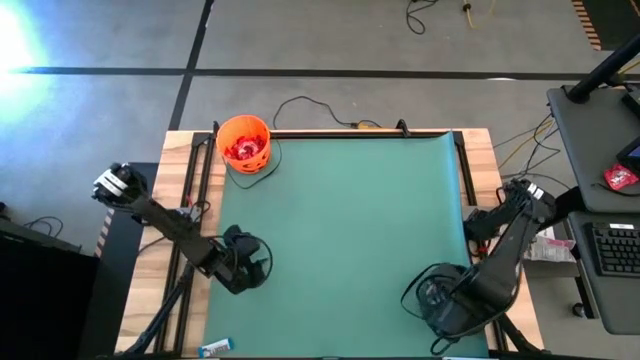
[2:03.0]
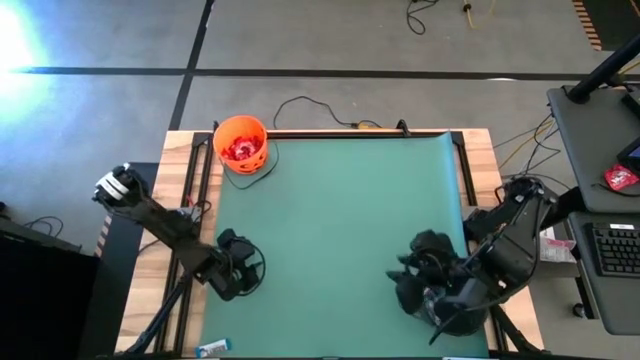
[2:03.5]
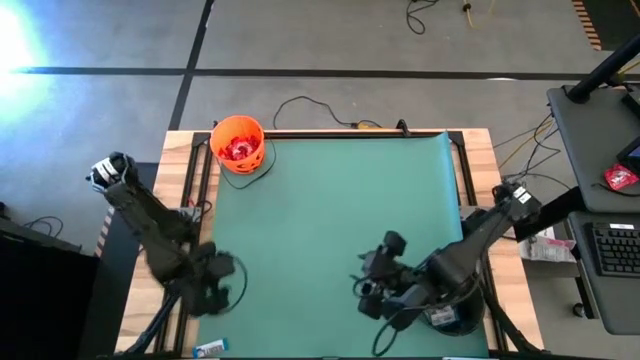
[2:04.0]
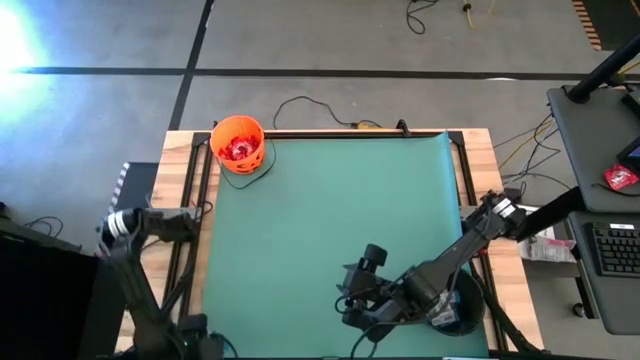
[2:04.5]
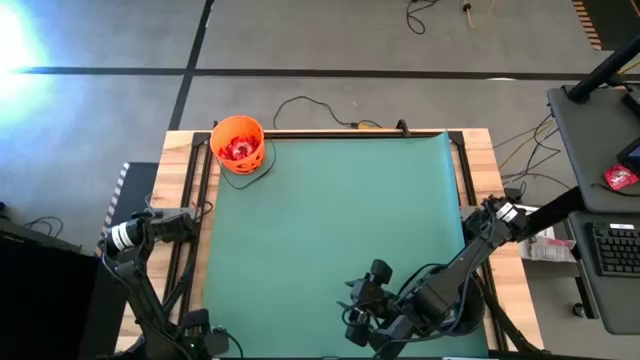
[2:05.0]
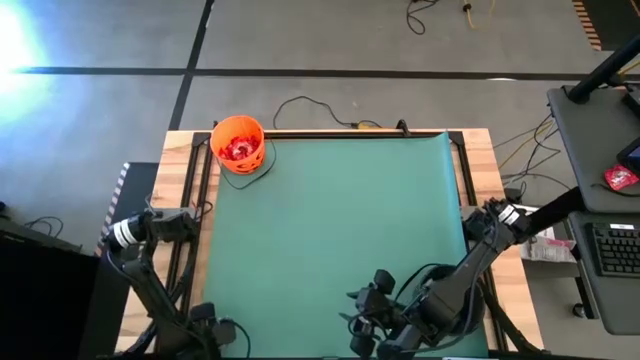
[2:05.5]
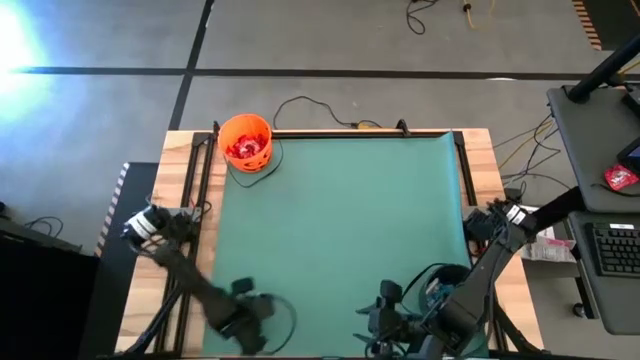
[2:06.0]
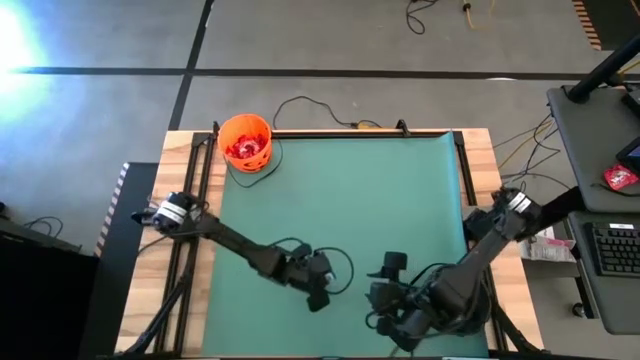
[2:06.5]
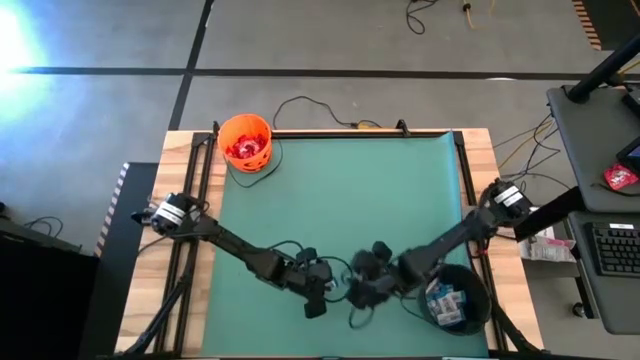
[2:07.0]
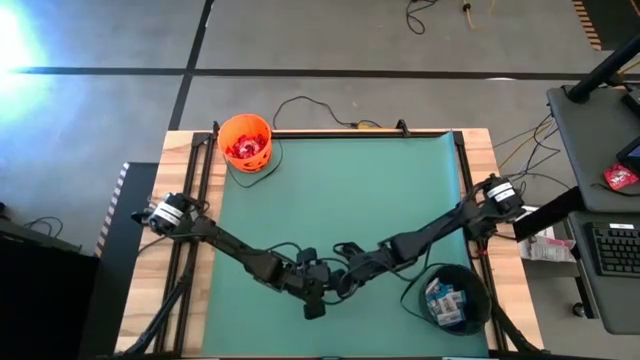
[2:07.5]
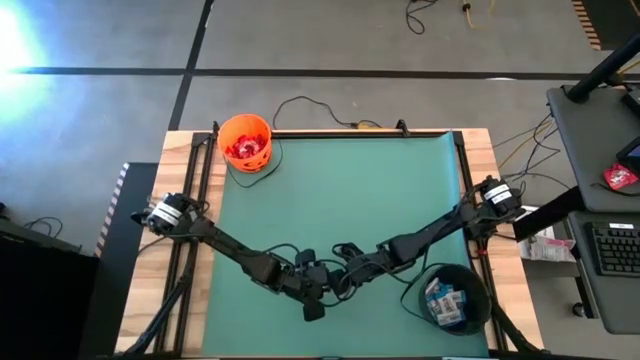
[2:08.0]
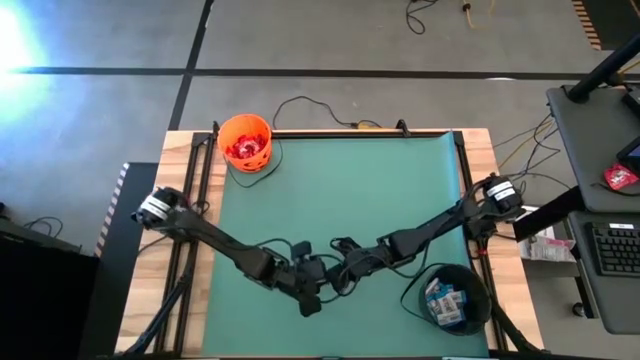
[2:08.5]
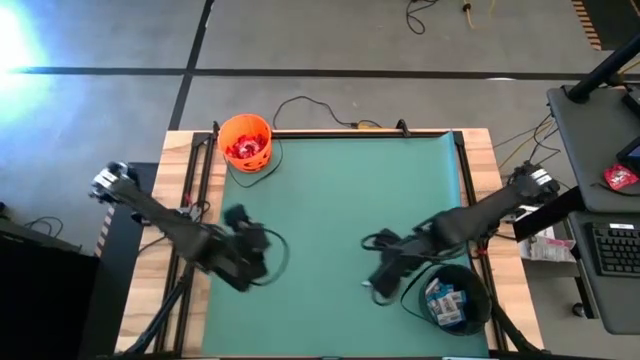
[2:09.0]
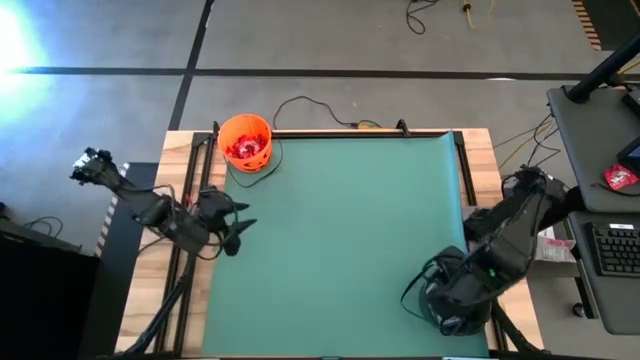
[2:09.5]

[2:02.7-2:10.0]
Task: Sort candy by brand, put in halloween buckets
Put the white chocolate into the black bucket

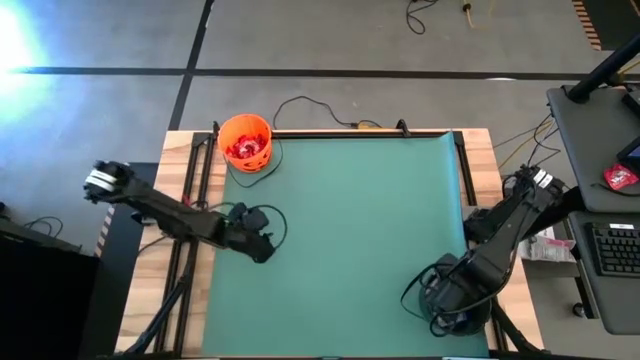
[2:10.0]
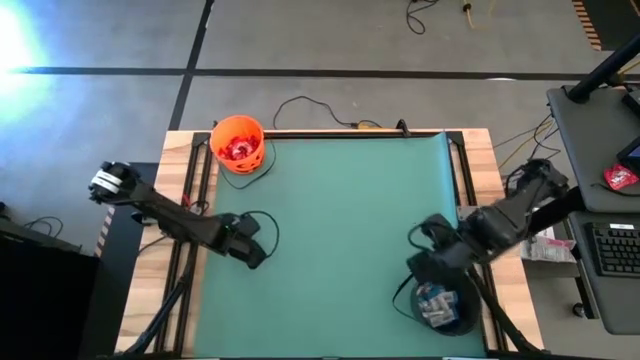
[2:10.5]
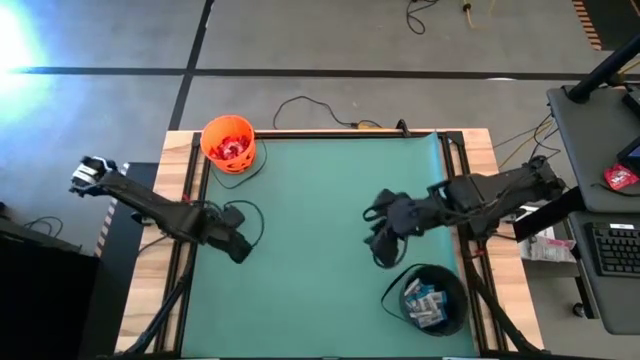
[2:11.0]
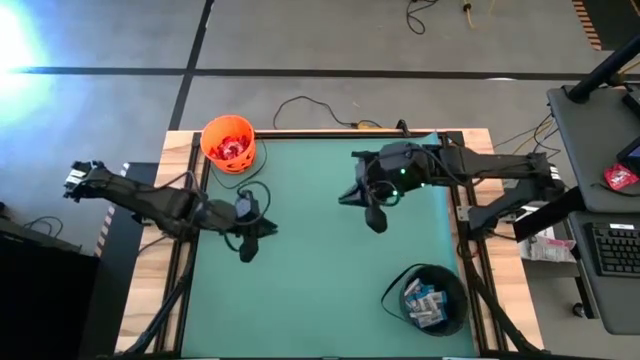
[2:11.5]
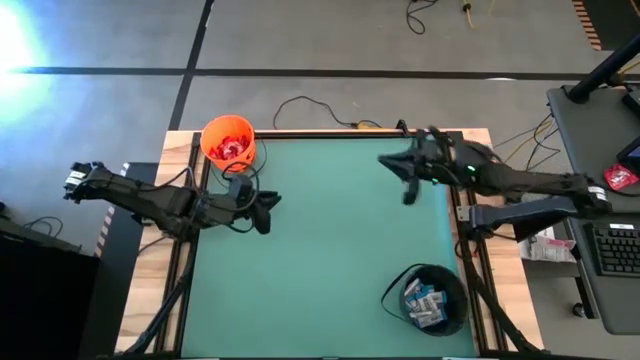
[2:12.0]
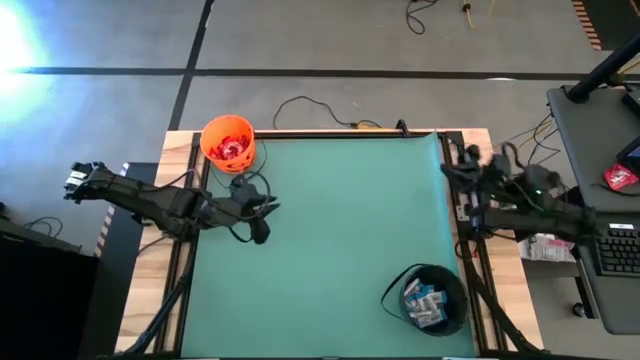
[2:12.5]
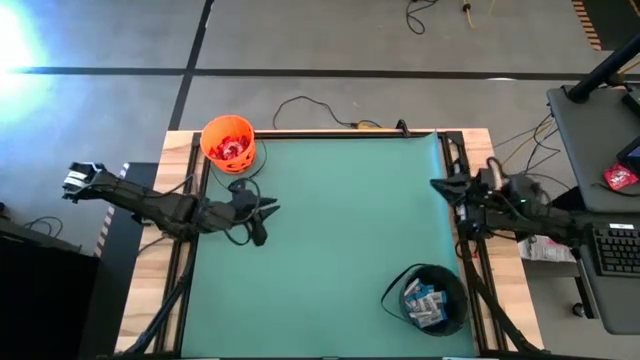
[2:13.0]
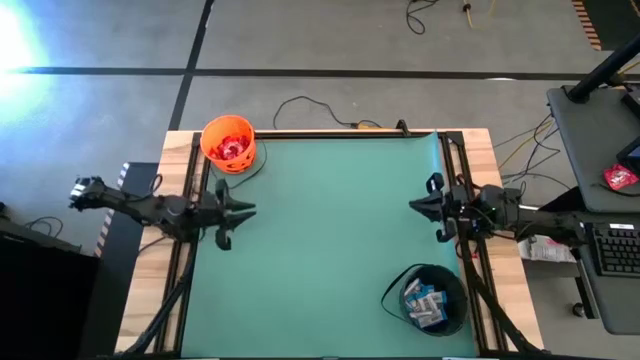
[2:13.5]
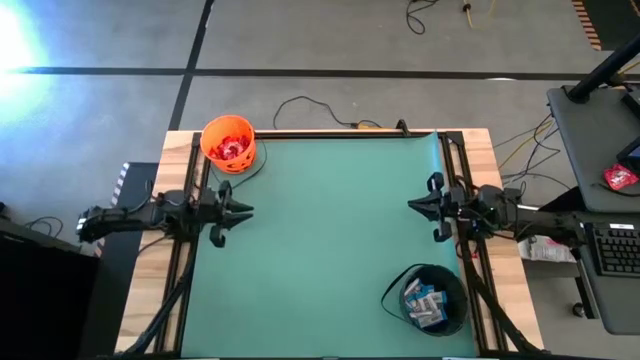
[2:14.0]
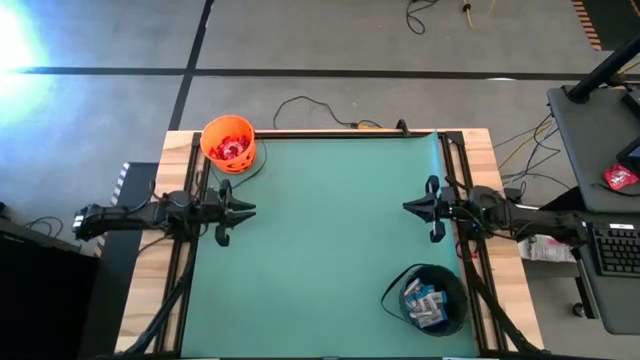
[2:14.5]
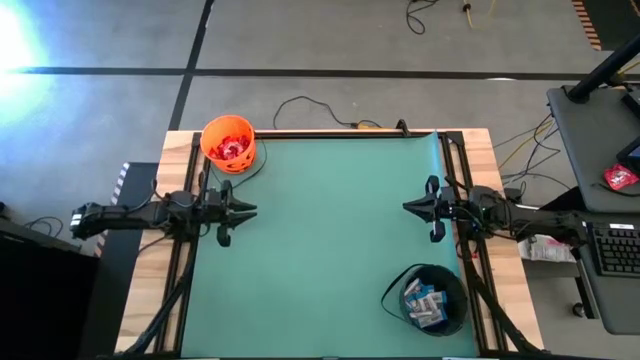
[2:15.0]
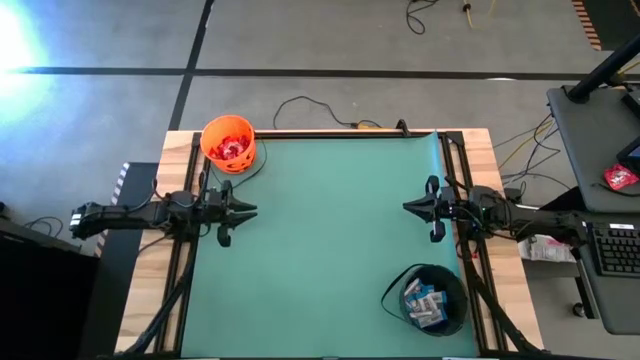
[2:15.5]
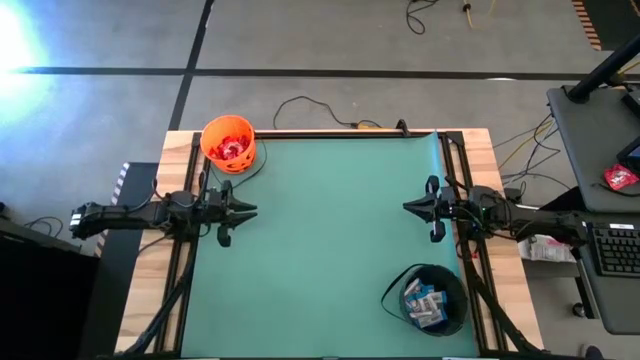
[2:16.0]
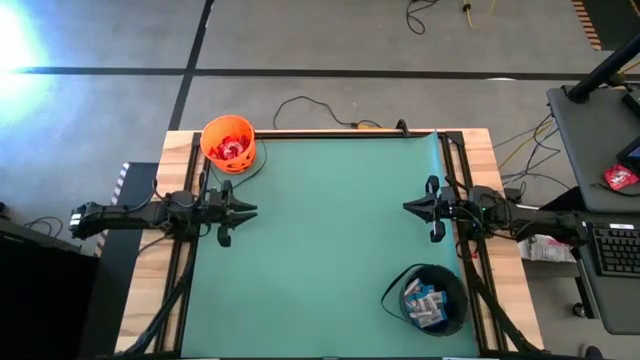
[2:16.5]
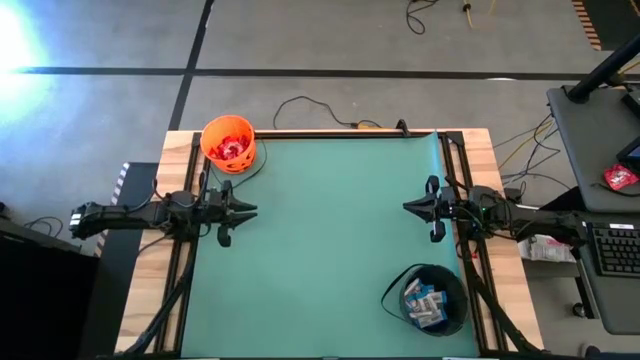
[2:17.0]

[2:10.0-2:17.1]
Return to Home Position

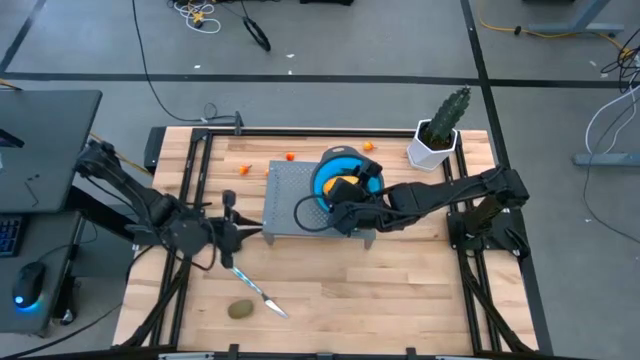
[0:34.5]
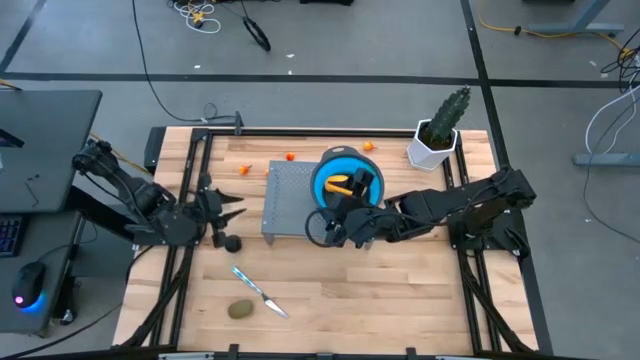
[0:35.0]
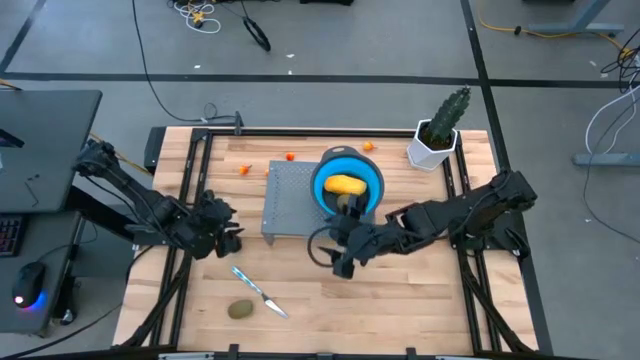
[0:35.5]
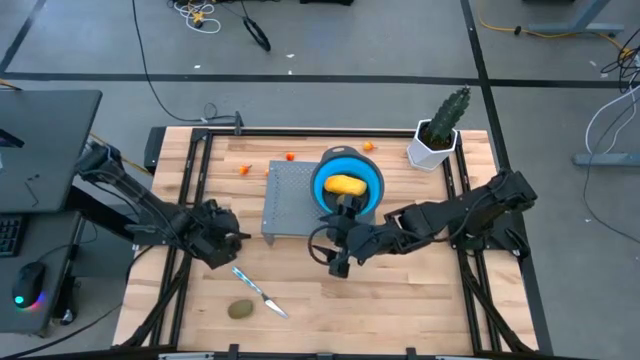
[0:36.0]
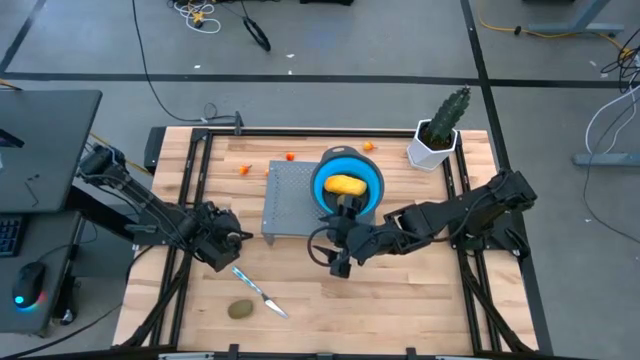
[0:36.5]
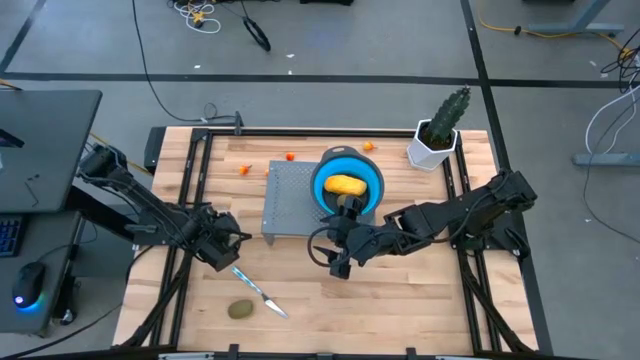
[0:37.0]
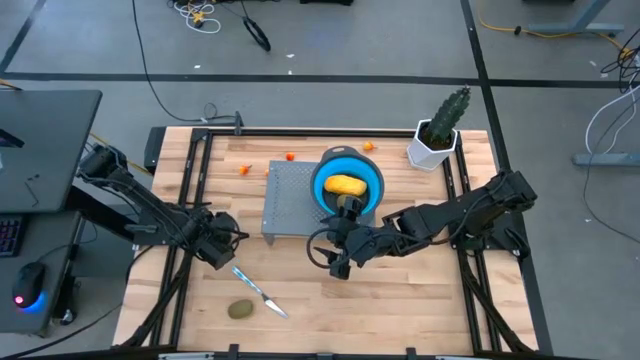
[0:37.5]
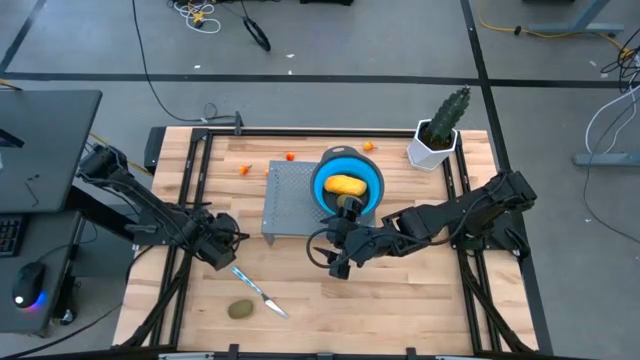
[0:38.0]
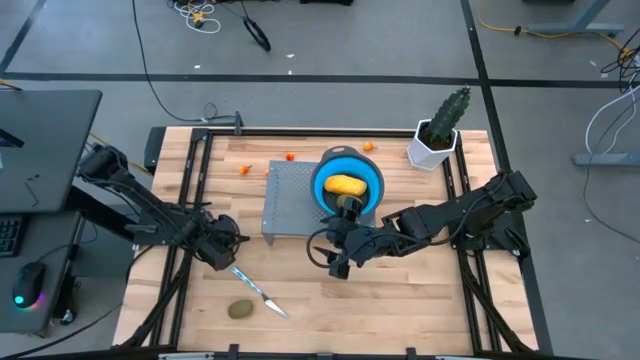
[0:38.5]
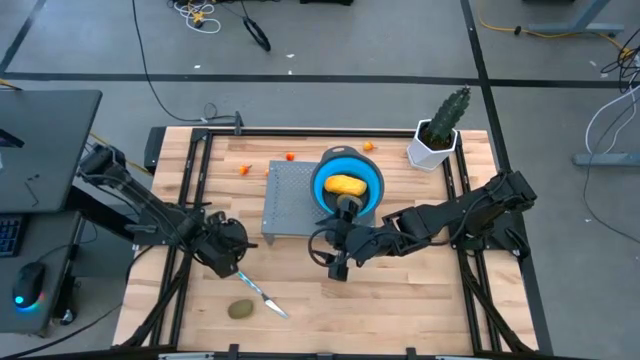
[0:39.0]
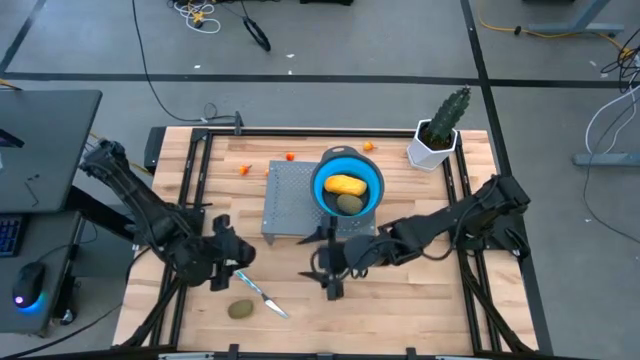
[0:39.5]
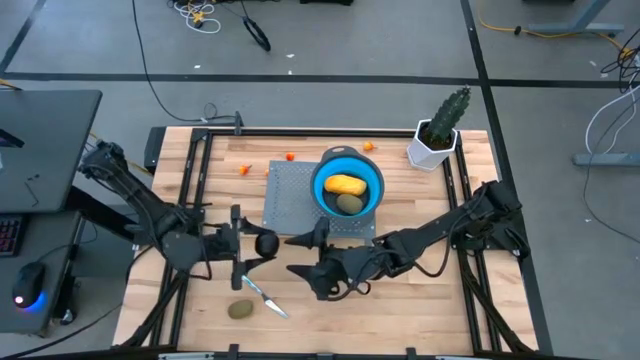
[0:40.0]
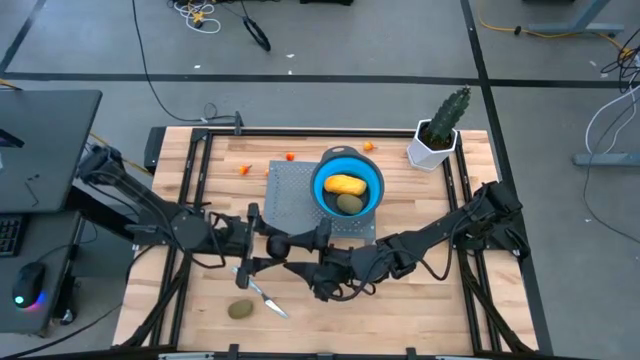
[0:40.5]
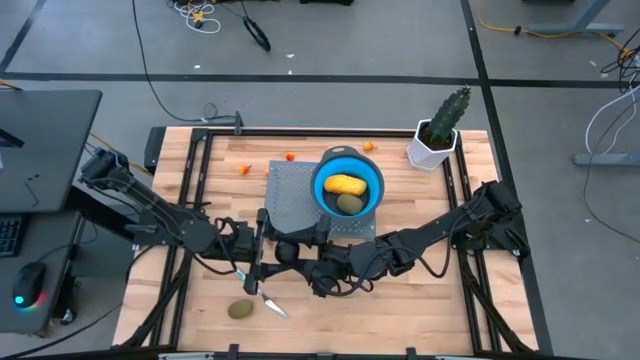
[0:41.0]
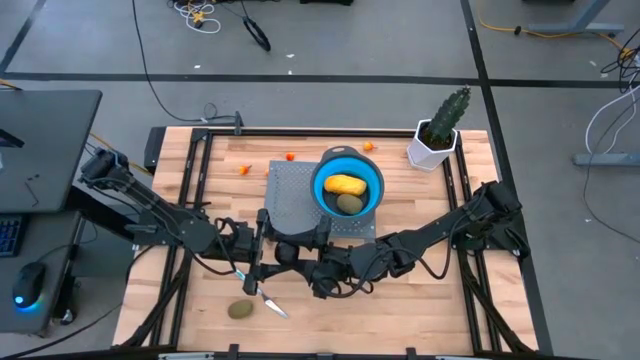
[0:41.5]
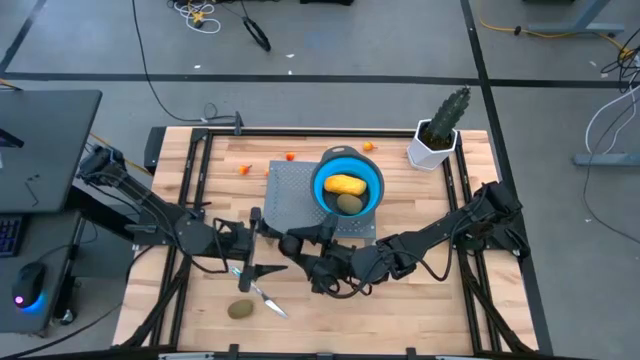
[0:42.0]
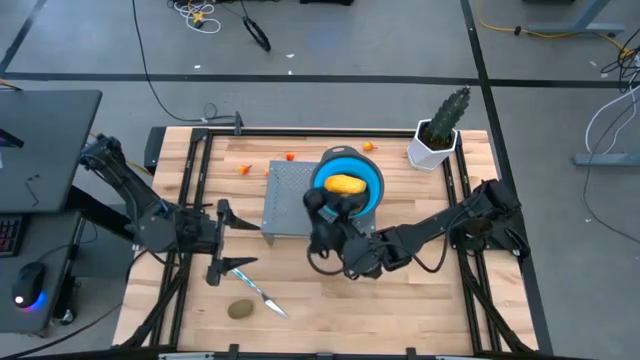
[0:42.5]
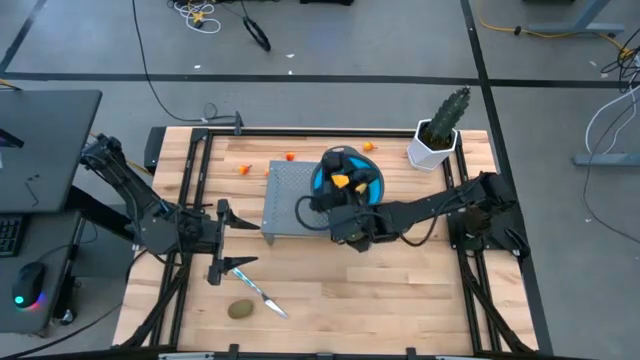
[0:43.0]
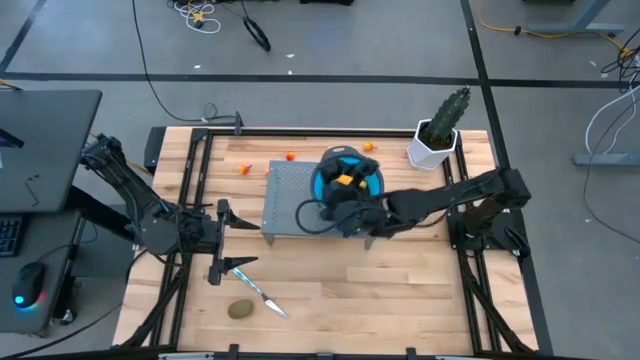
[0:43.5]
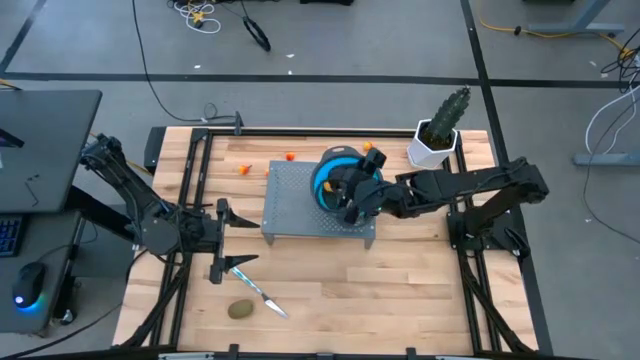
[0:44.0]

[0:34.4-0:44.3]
Task: Pick & Place Fruit
Put the black plum into the blue strainer bowl on the shelf
